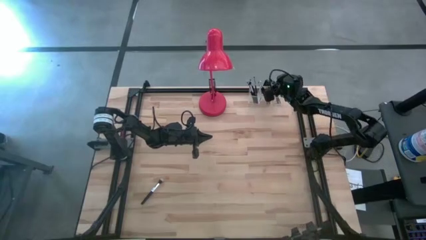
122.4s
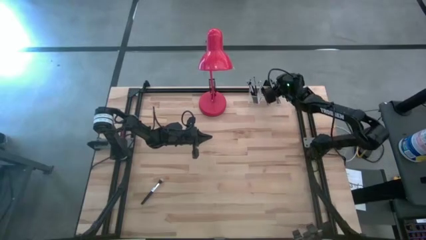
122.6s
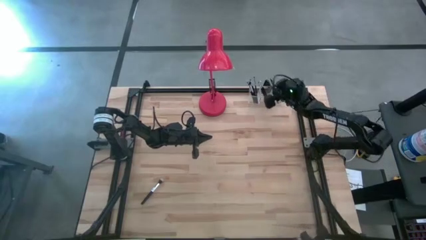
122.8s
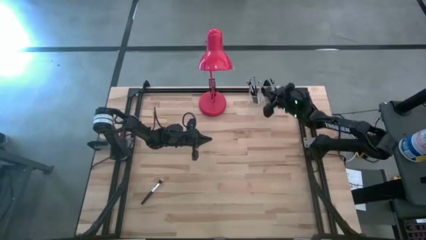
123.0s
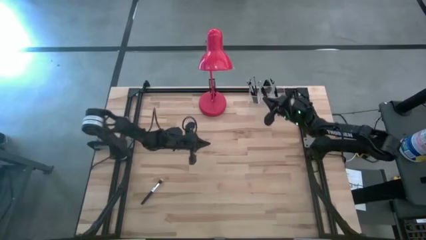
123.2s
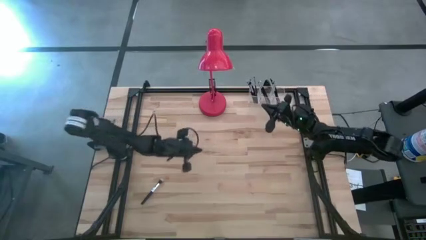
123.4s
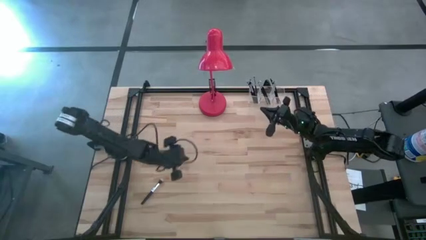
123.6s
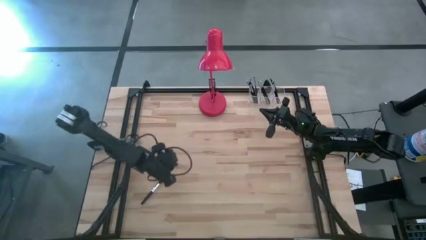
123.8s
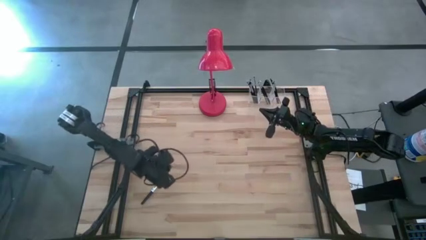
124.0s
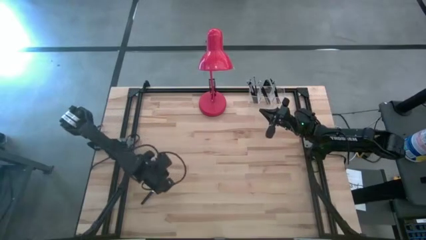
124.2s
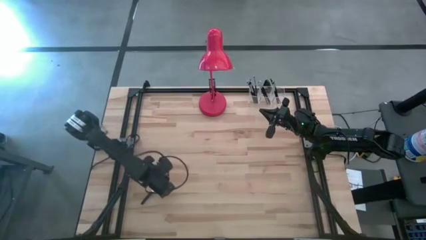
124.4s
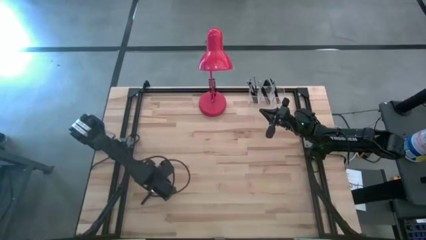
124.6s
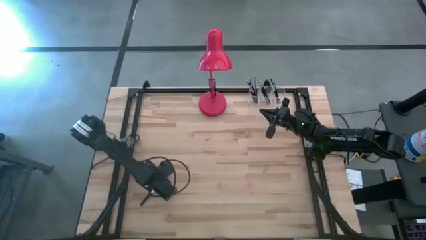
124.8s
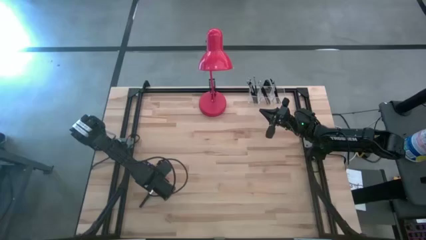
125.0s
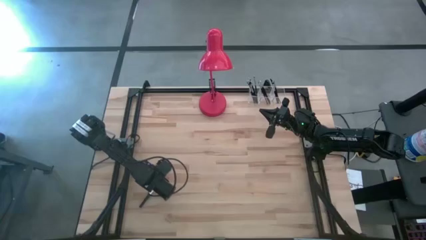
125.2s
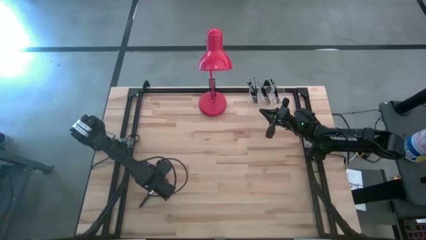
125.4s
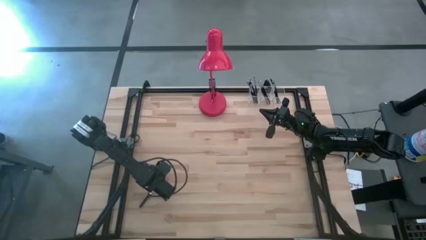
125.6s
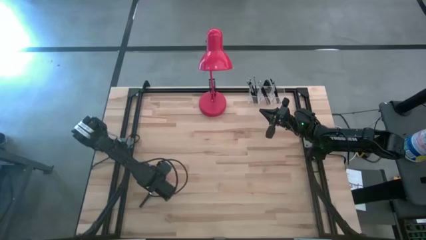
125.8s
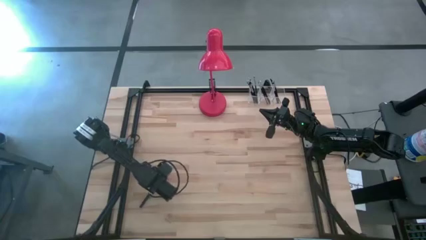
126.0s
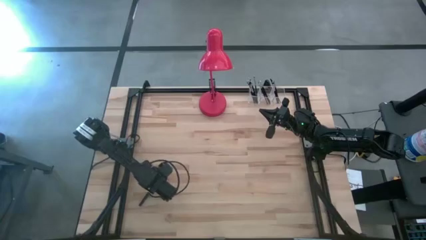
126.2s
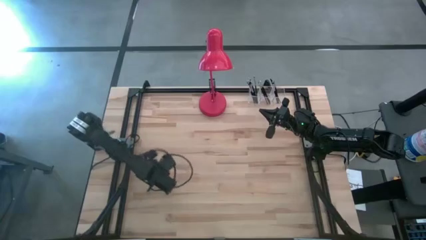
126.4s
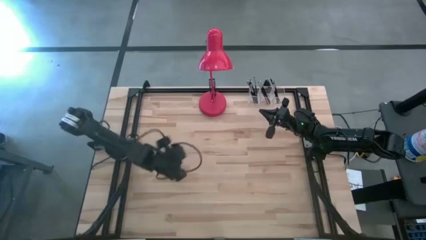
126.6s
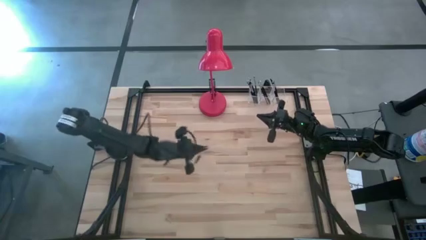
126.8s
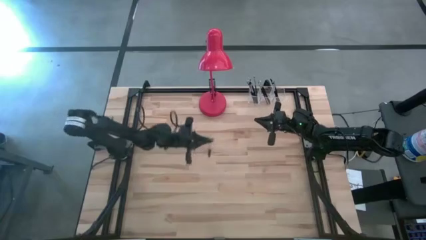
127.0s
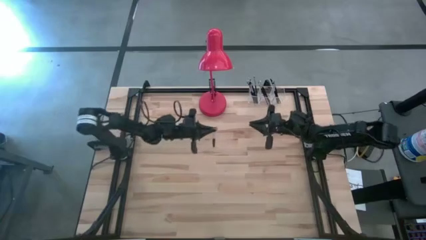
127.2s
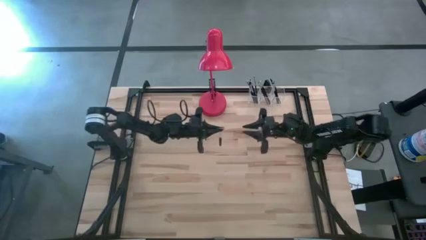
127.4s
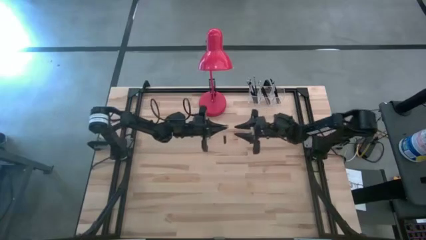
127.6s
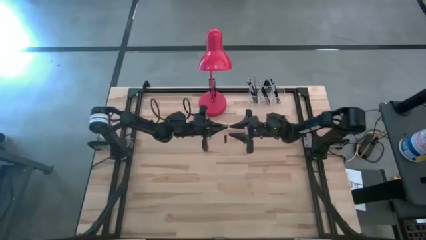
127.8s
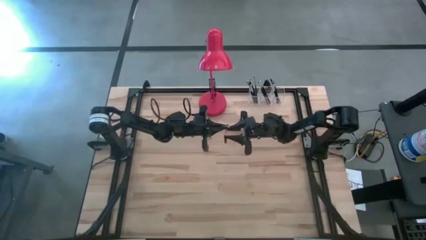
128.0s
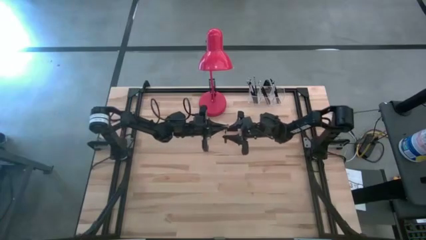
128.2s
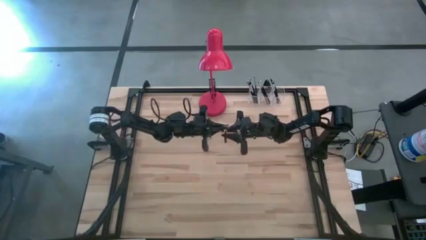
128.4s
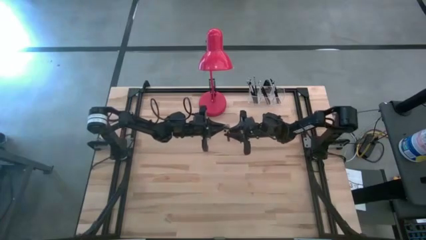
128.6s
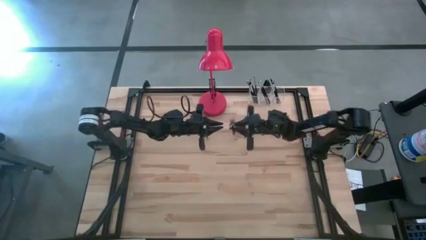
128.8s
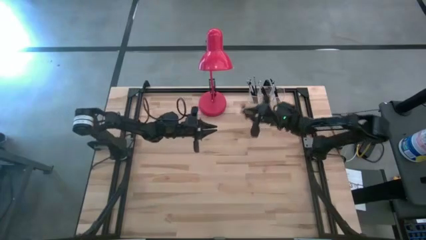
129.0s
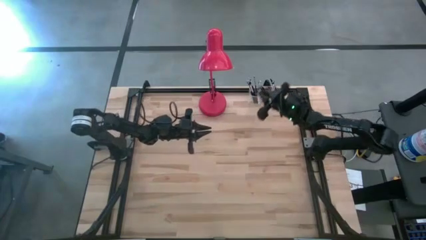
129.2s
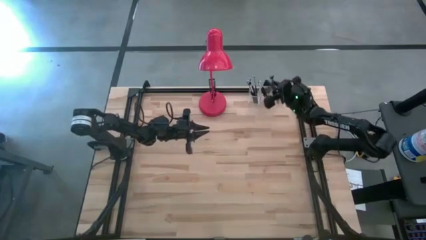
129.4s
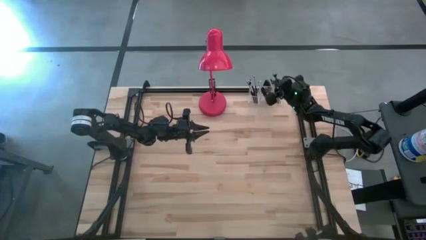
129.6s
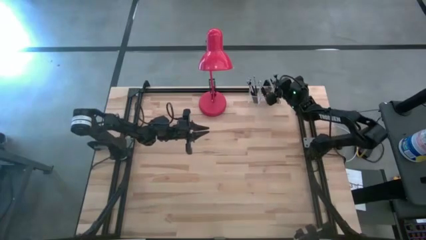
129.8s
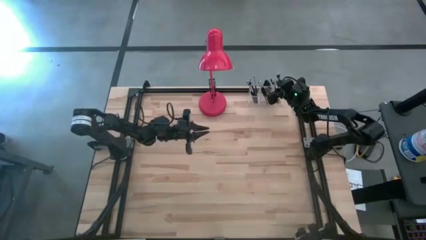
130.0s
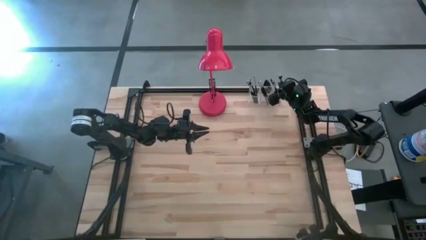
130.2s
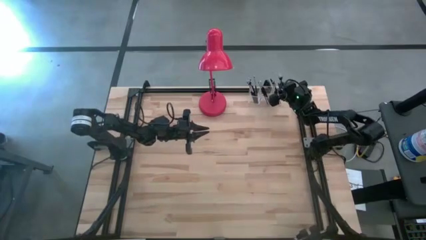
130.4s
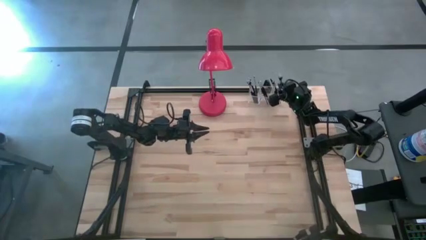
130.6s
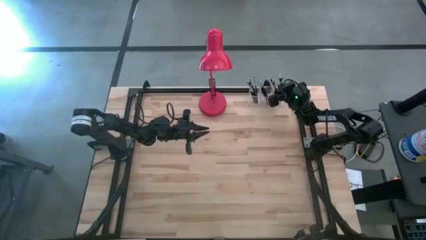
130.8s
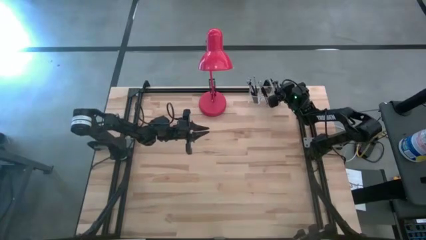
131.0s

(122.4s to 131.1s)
Task: Sort items
Put the black blush brush into the transparent organizer

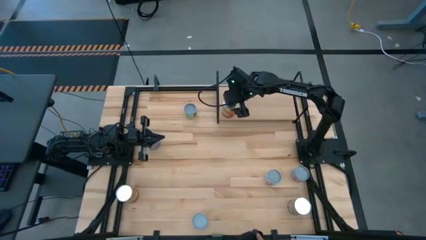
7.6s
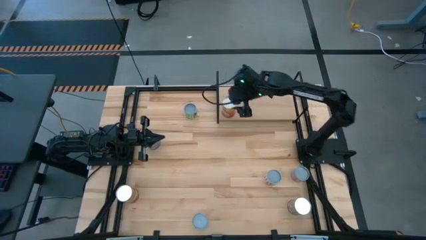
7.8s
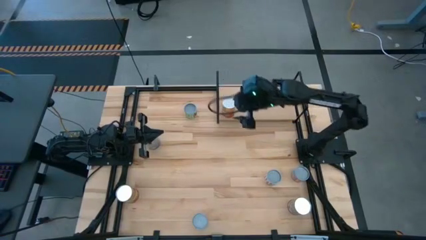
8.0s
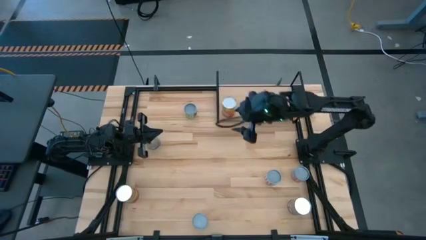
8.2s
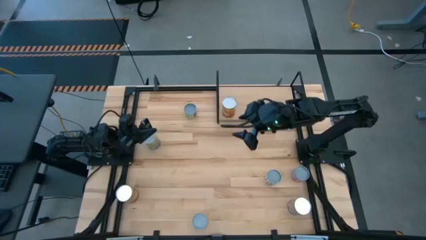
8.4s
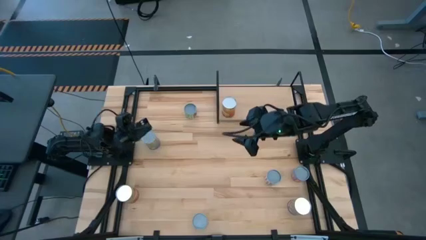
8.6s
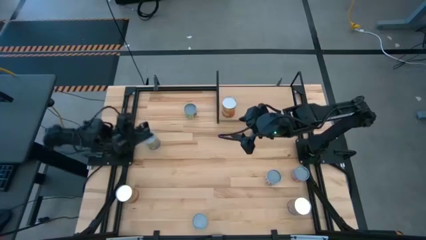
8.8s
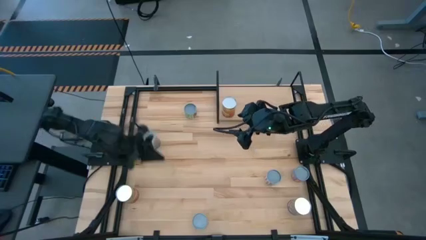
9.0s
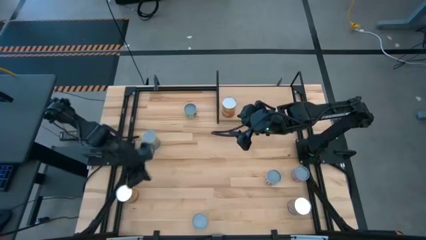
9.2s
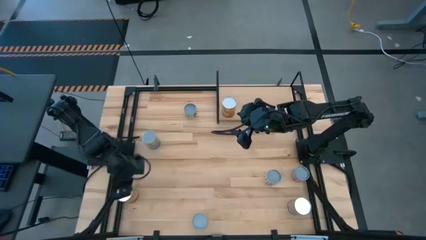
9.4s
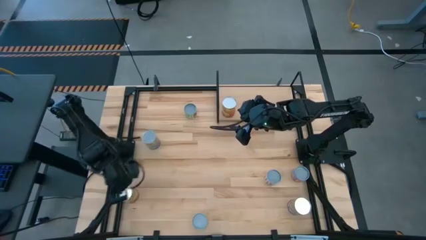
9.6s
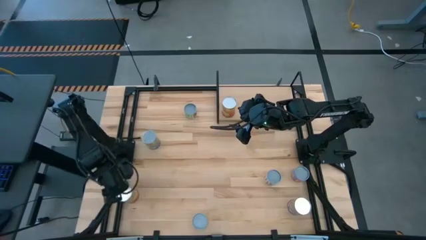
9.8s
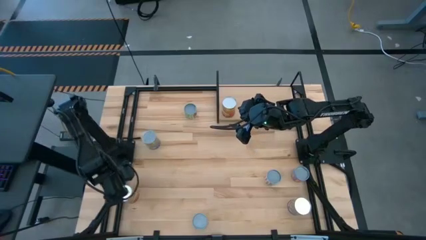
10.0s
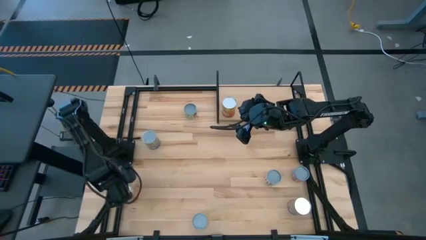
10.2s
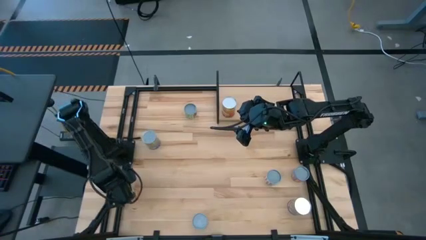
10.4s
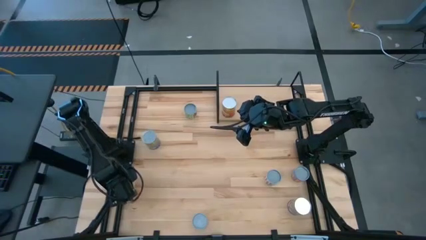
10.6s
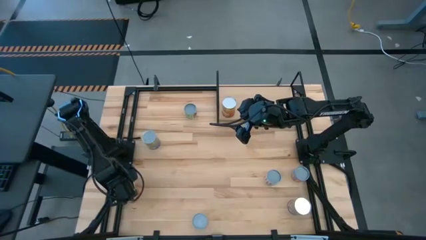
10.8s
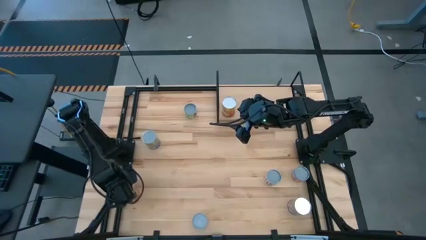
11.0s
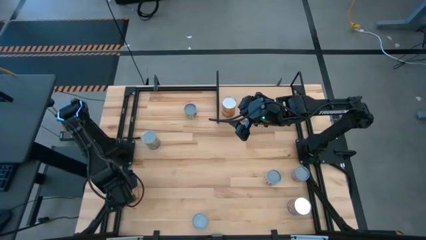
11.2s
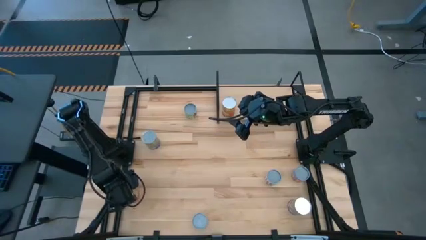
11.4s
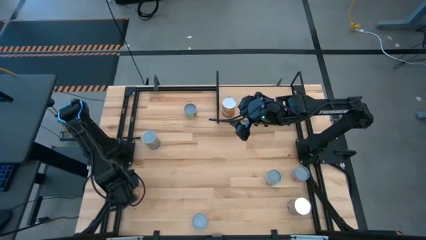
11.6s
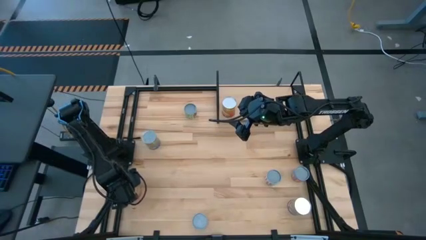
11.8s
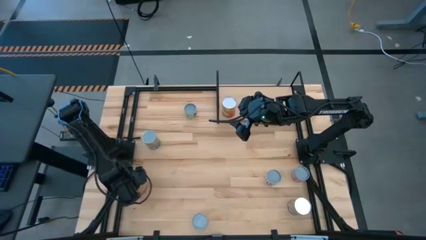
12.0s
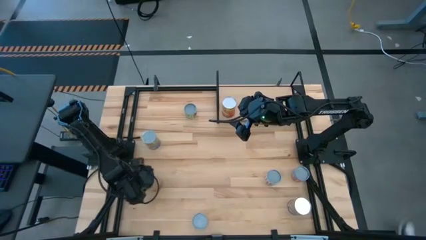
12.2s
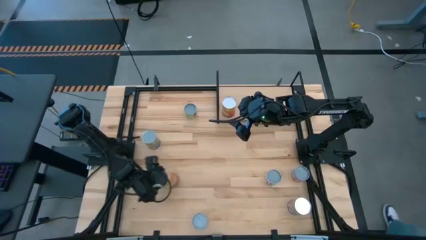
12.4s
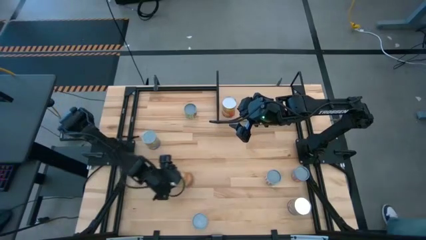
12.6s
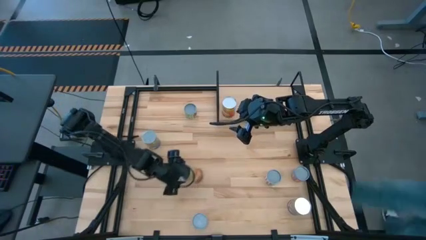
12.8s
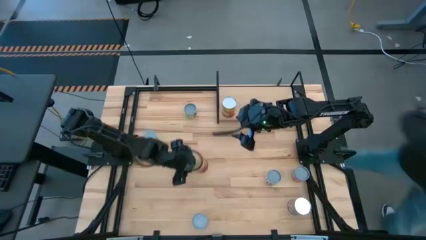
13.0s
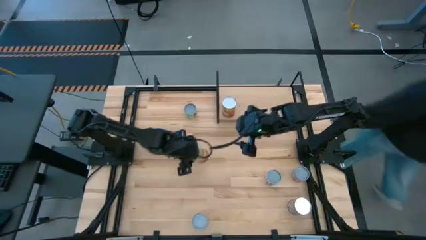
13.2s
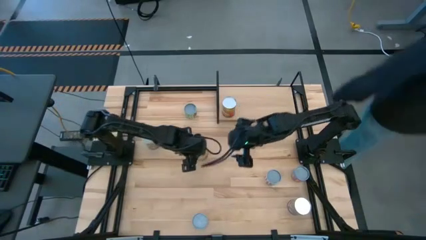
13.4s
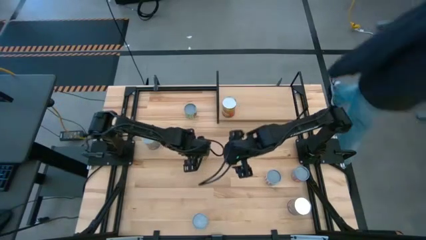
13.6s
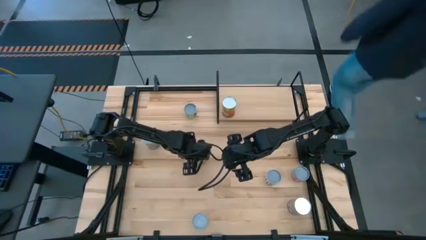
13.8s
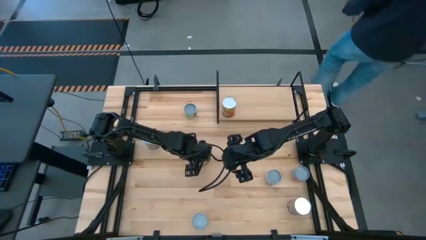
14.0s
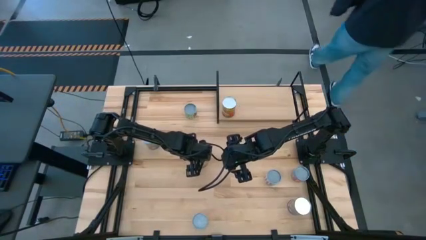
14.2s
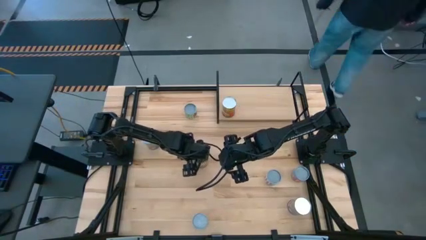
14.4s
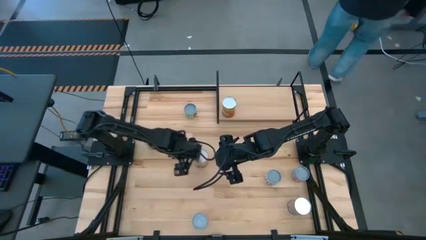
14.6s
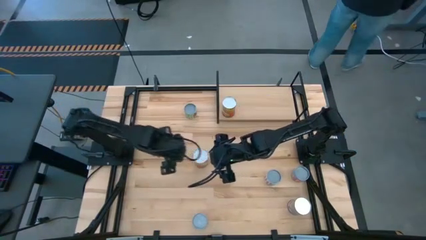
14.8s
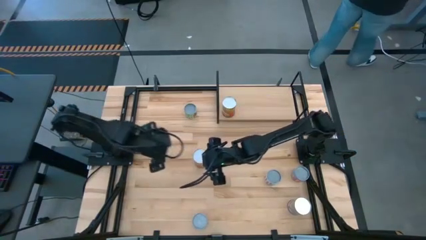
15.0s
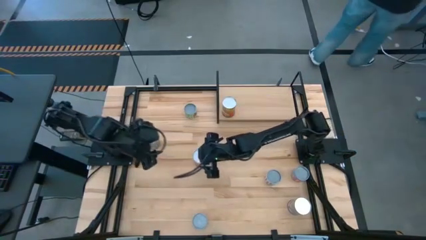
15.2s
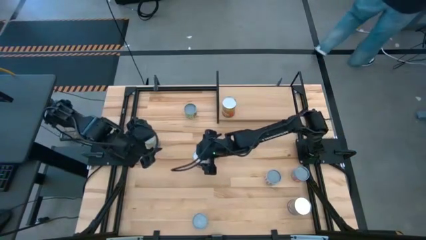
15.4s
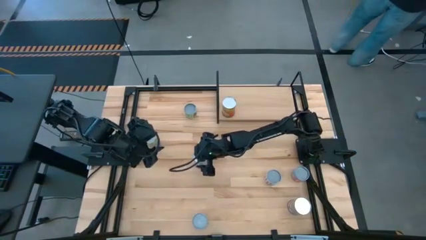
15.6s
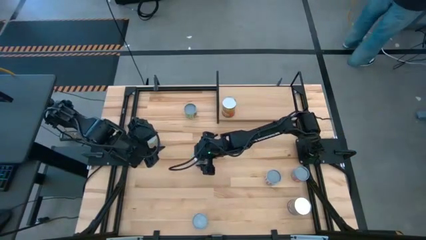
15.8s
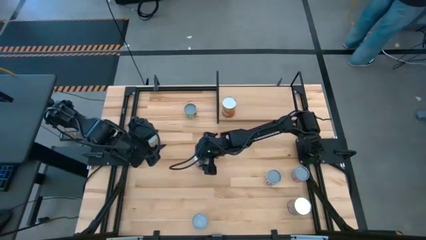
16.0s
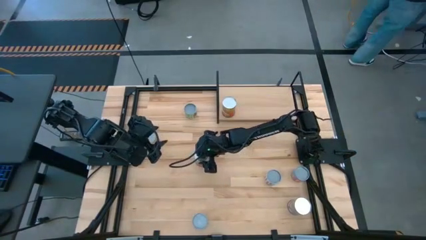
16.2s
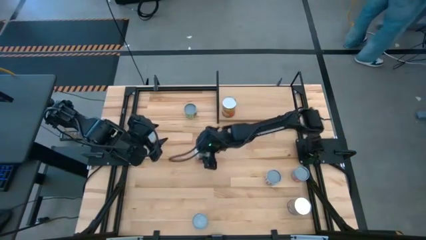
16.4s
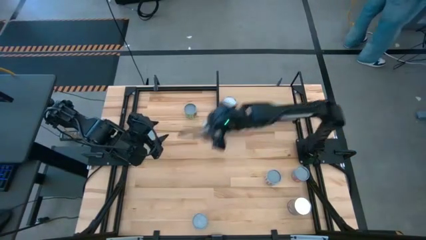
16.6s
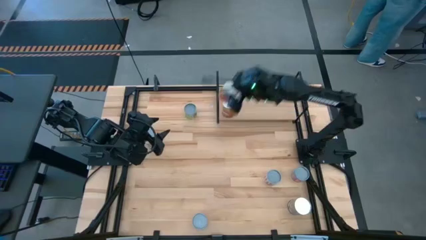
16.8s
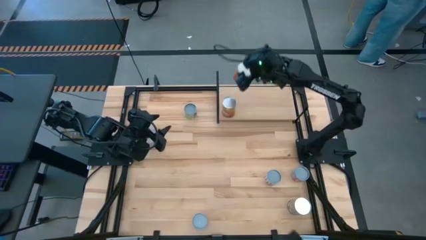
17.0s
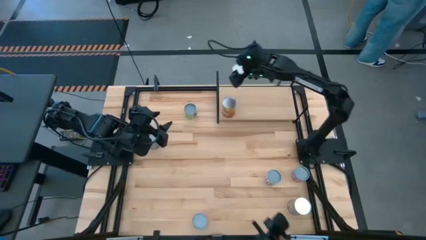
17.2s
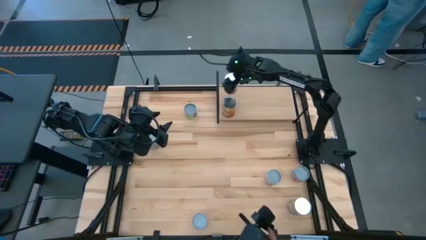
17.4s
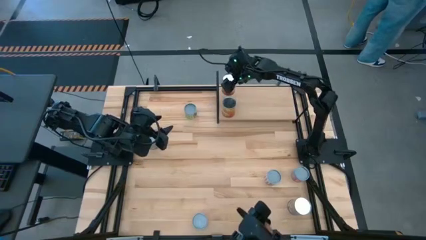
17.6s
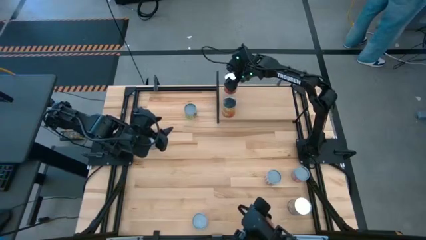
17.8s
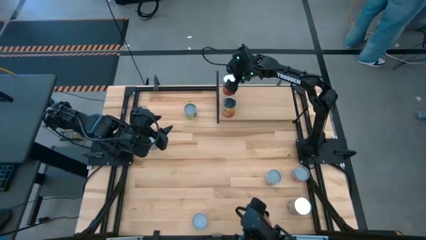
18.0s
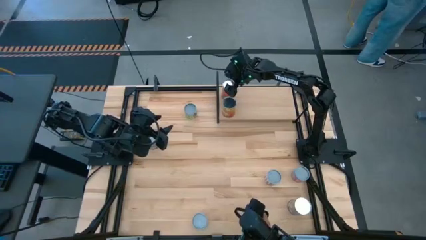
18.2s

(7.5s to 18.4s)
Task: Pick and place cans onto a shelf
Put the big orange can on the shelf aligned with the other big orange can
